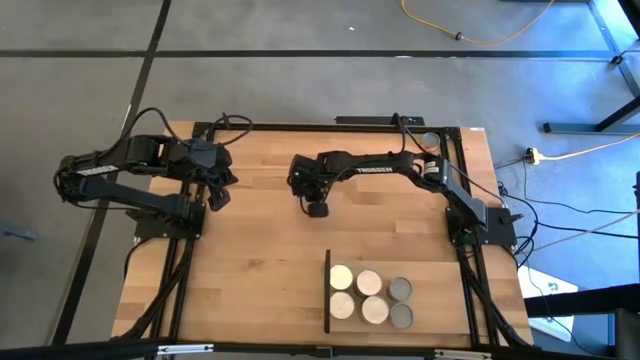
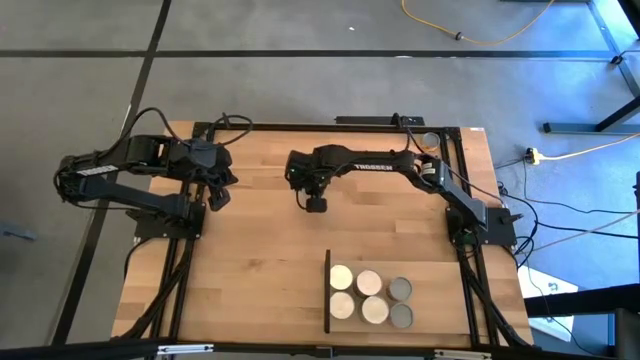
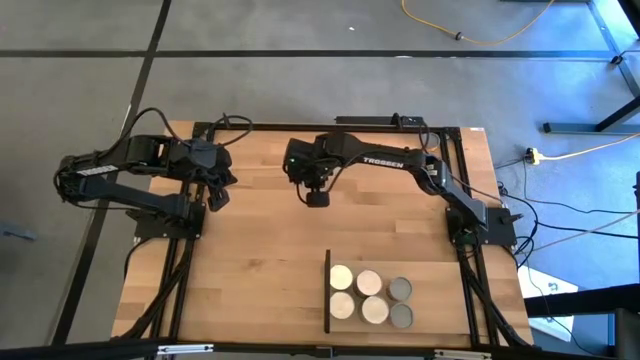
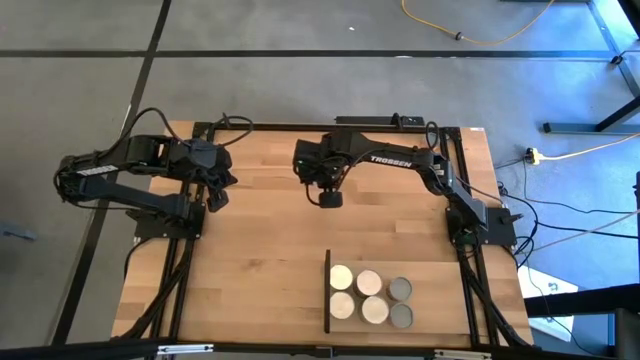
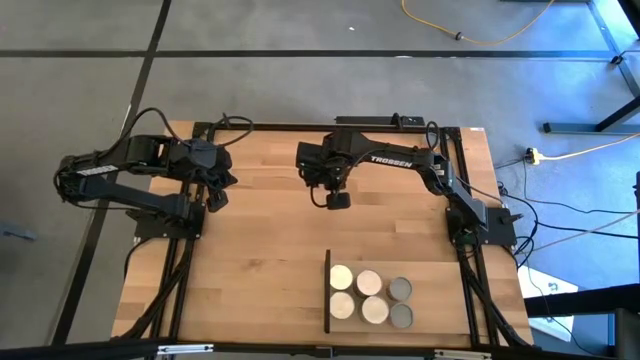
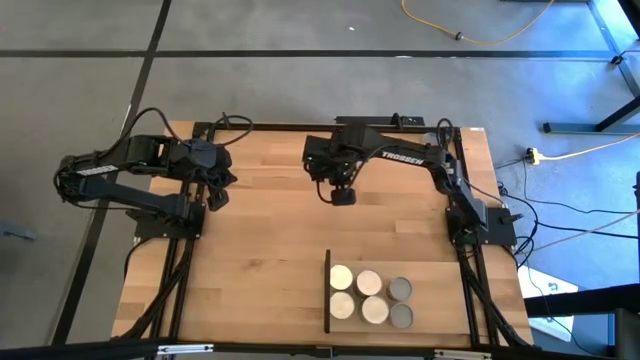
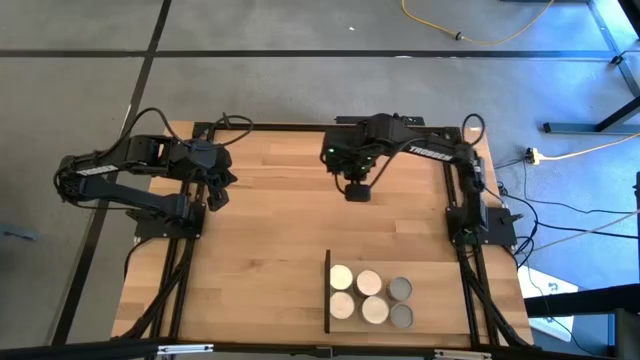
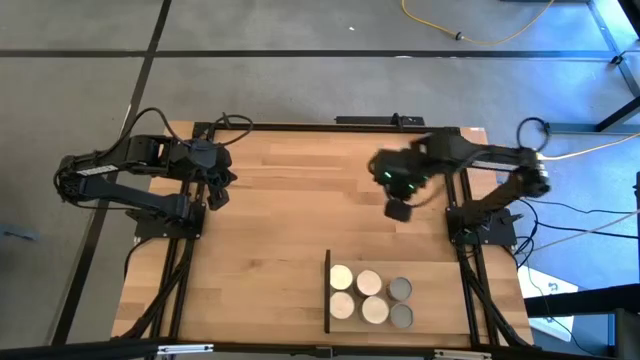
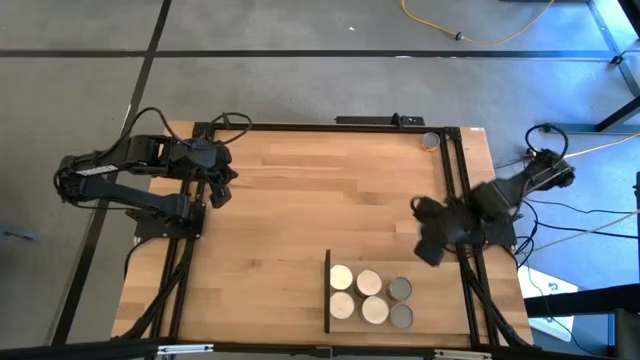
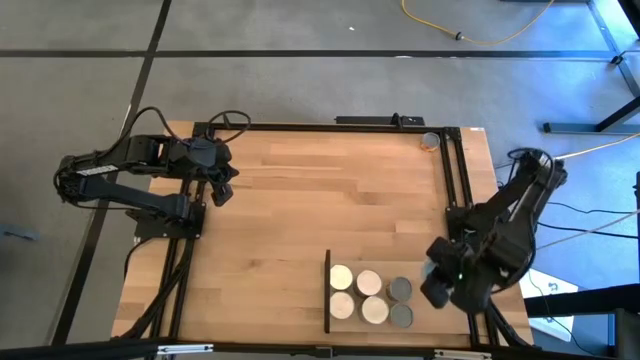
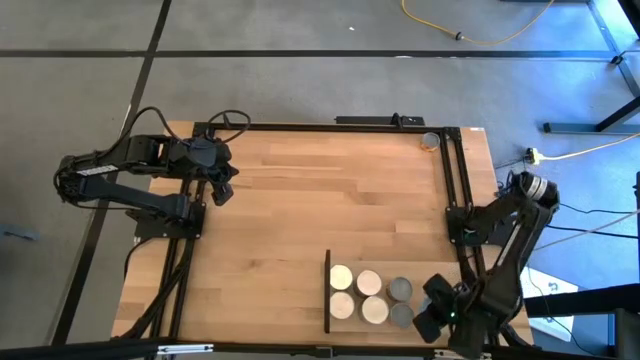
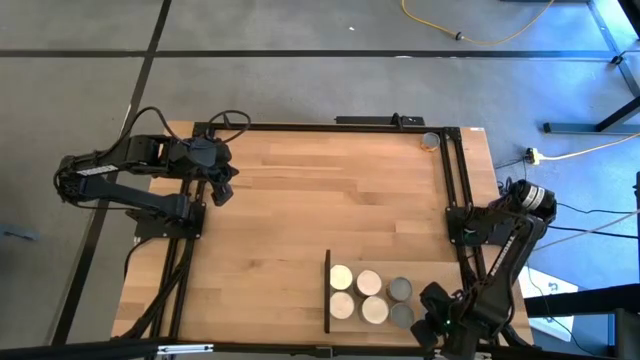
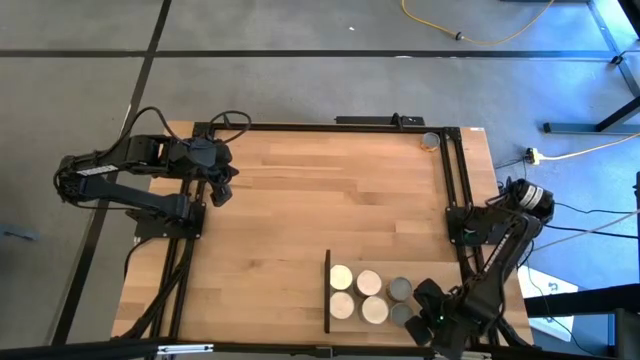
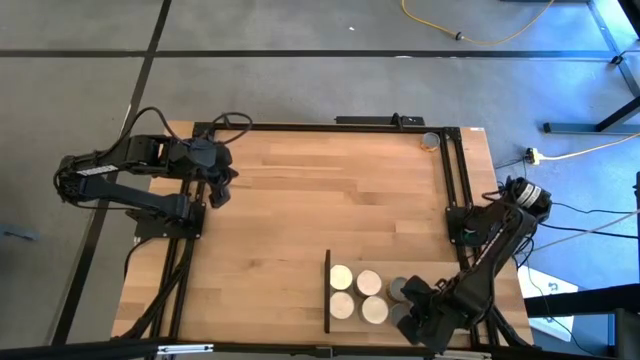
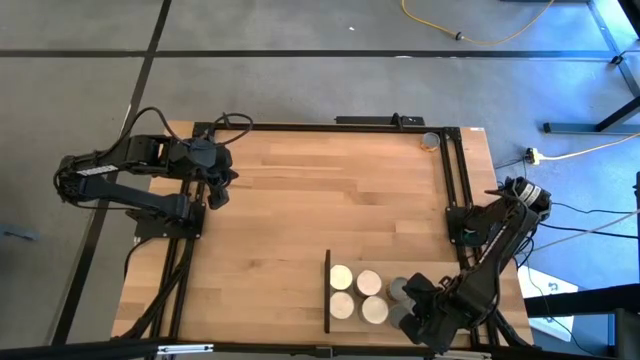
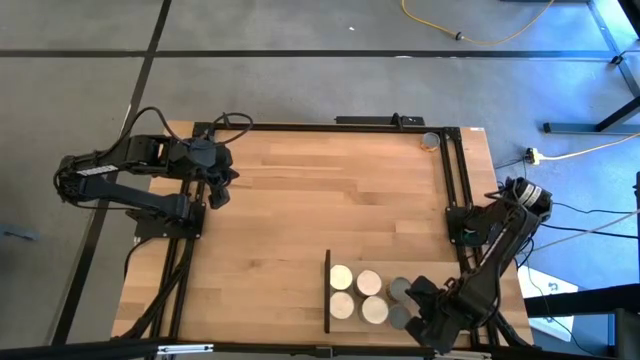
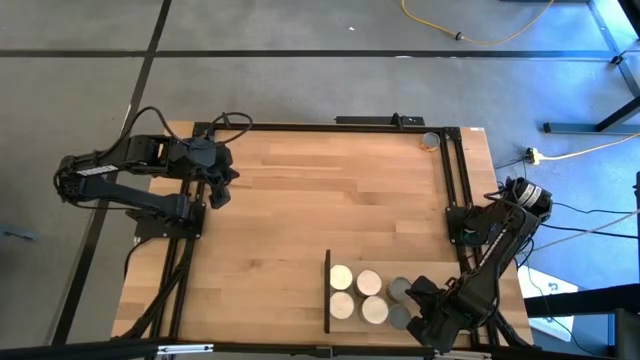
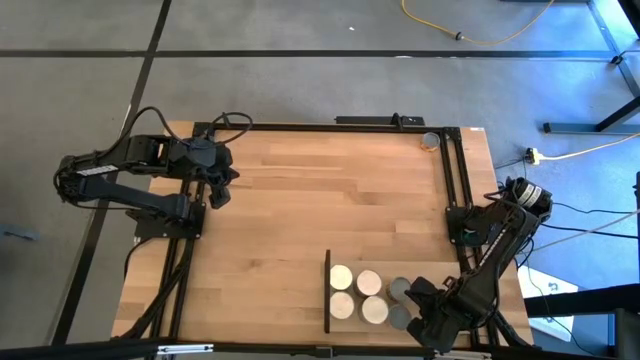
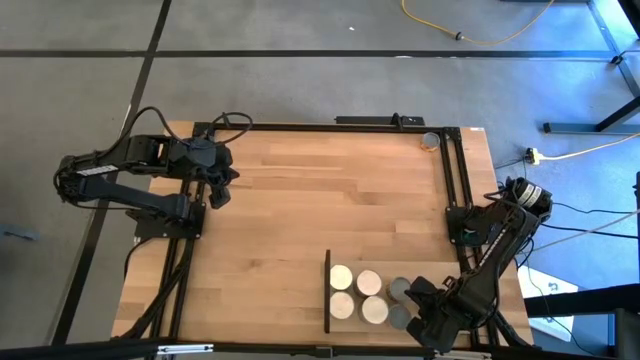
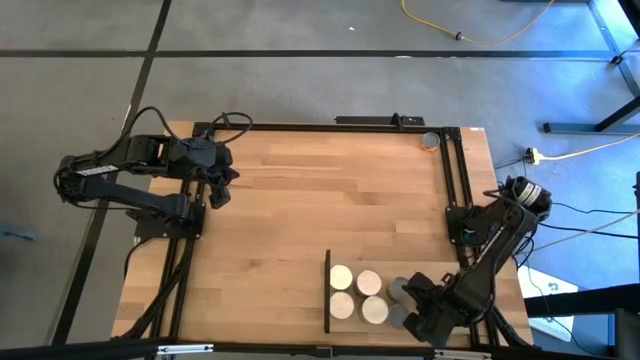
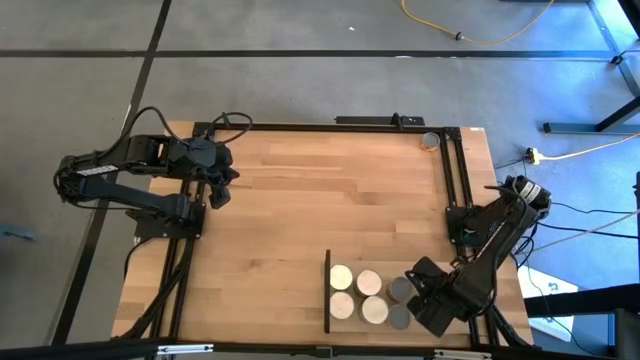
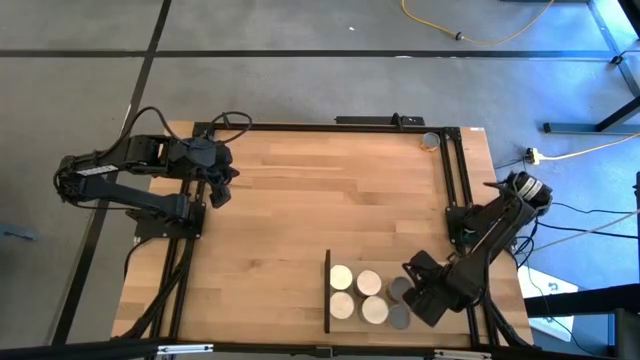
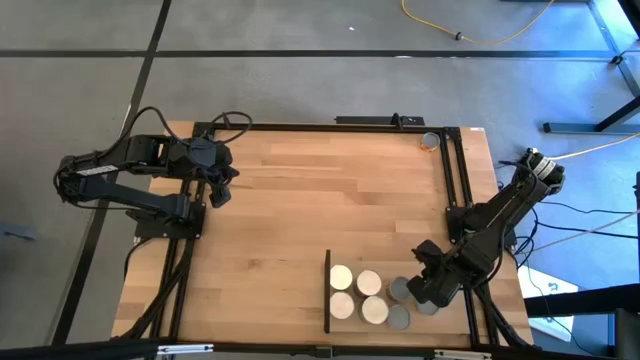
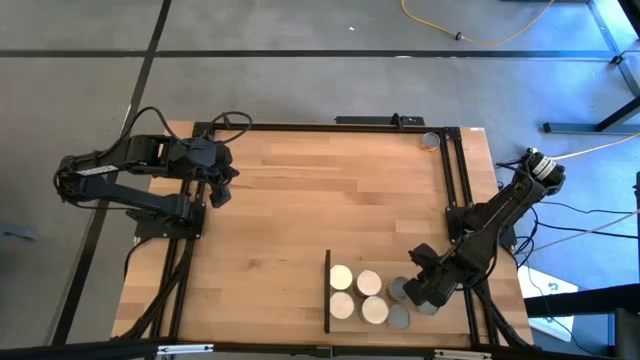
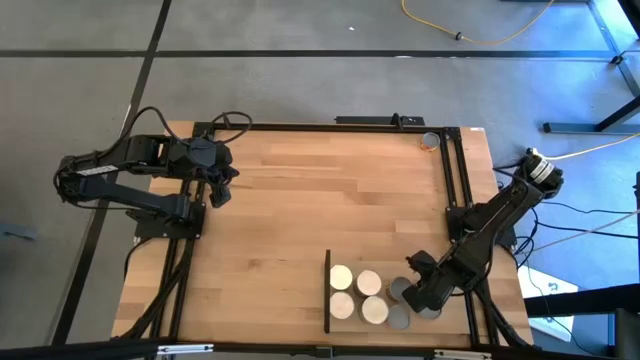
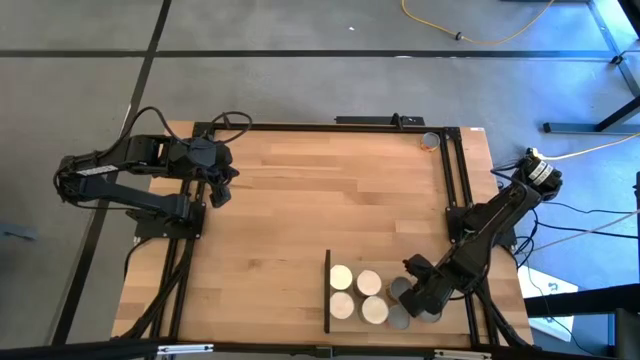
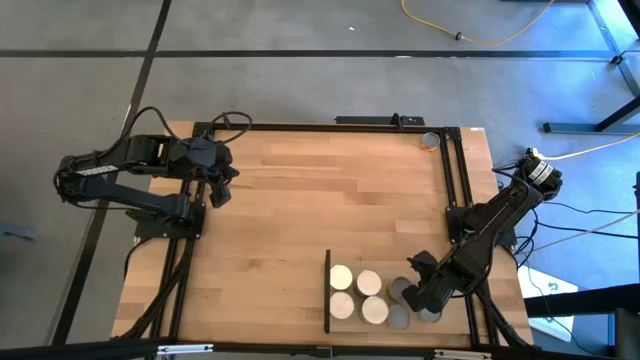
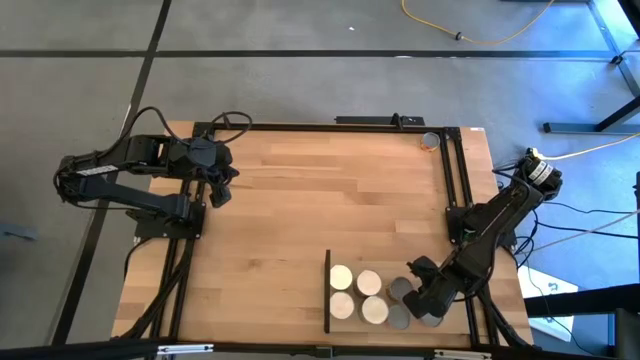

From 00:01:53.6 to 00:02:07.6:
Task: Pick and place cans onto a shelf
Put the blue tuna can on the shelf

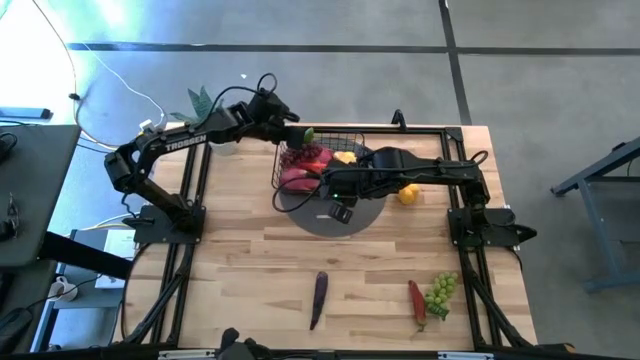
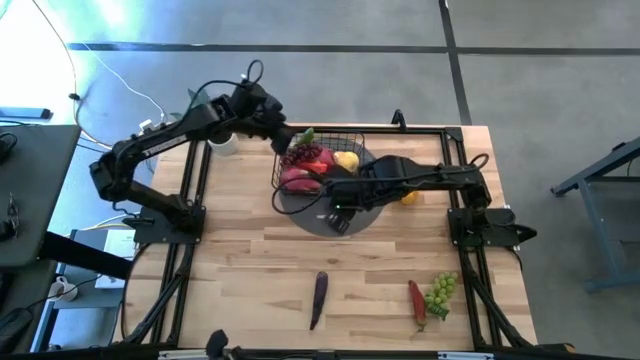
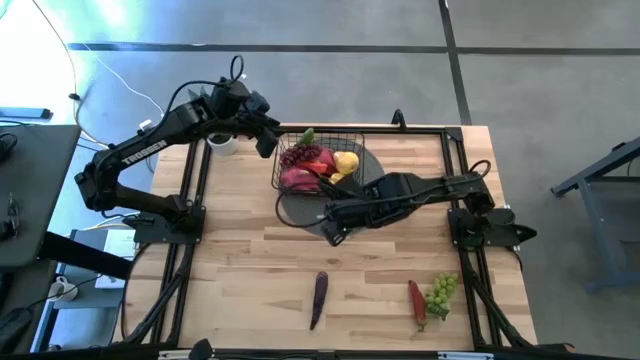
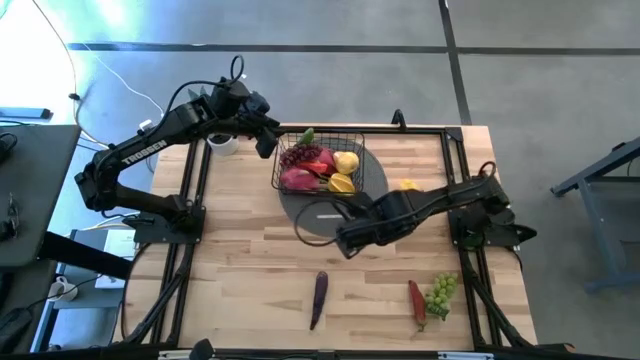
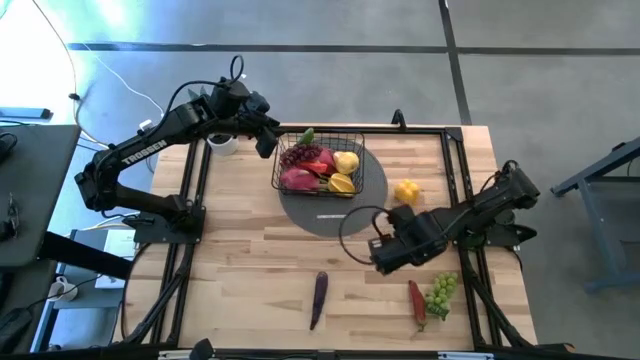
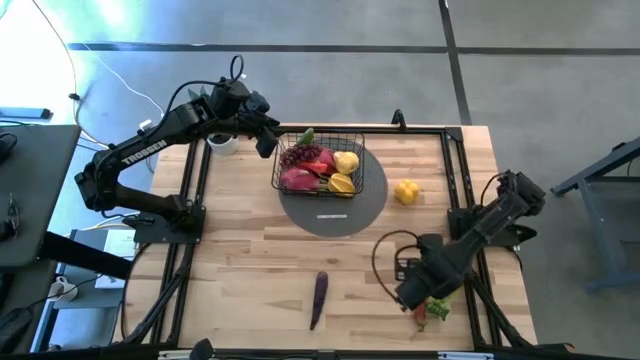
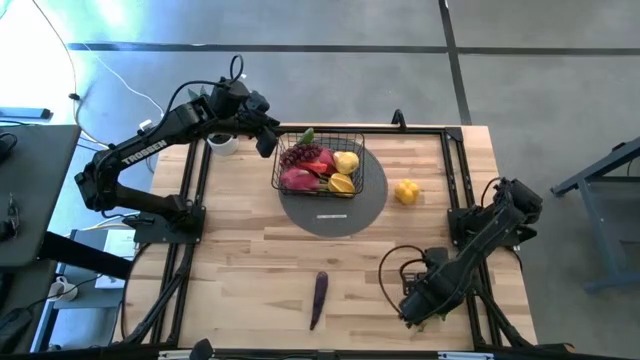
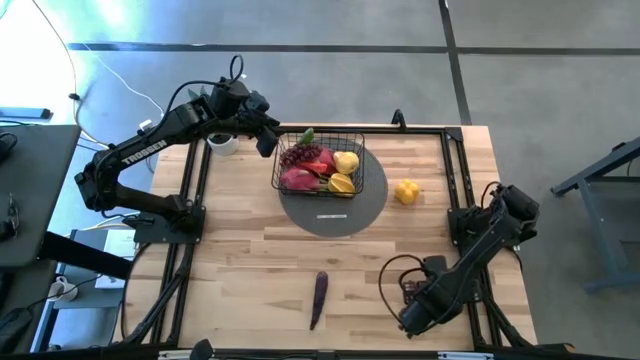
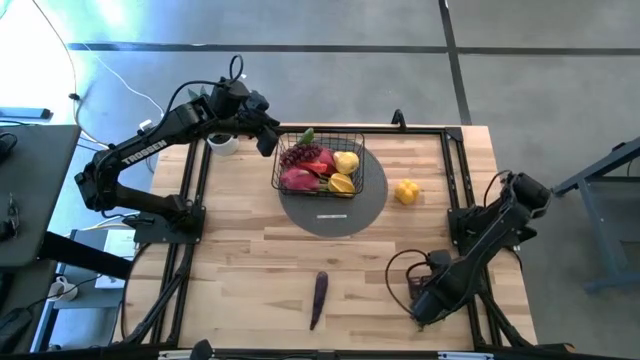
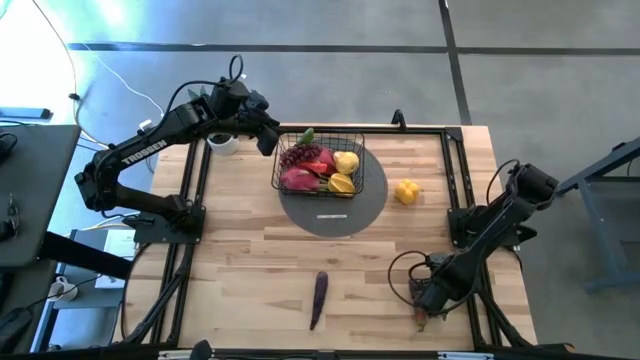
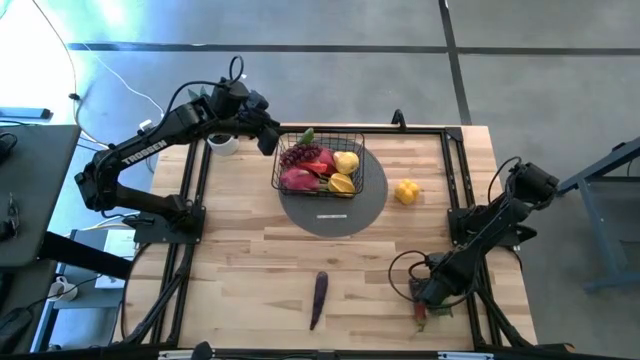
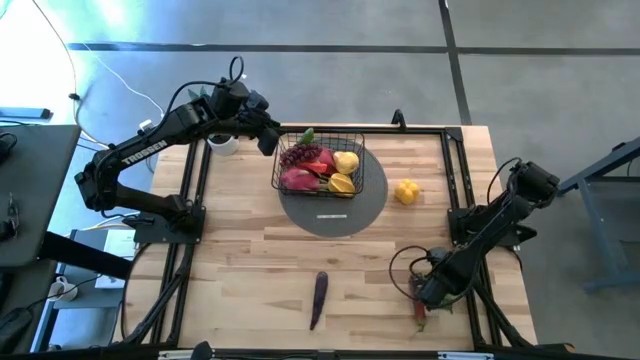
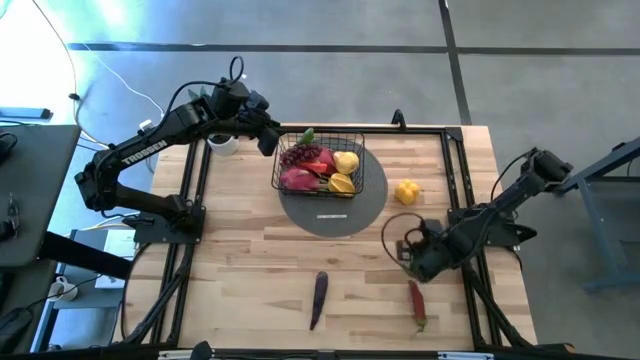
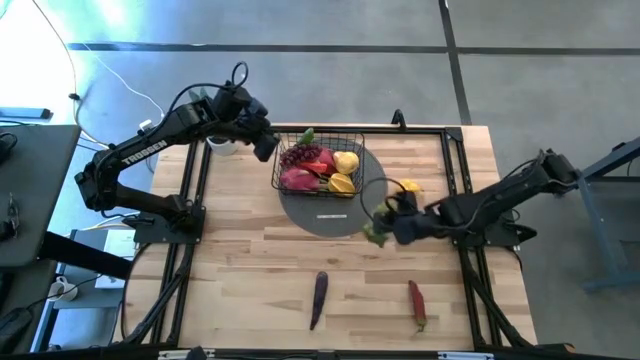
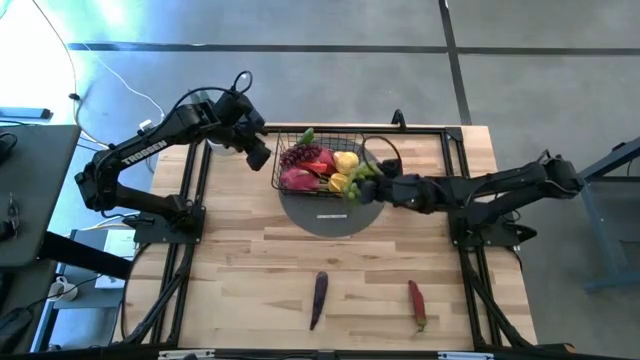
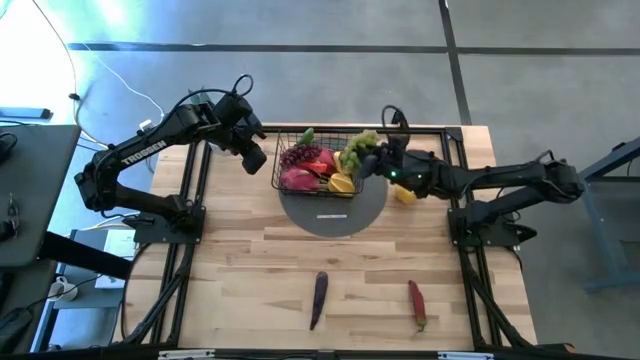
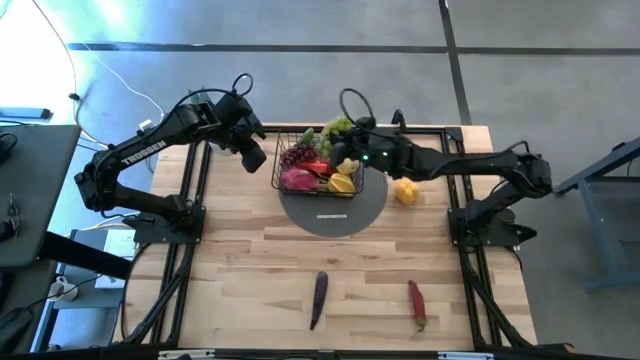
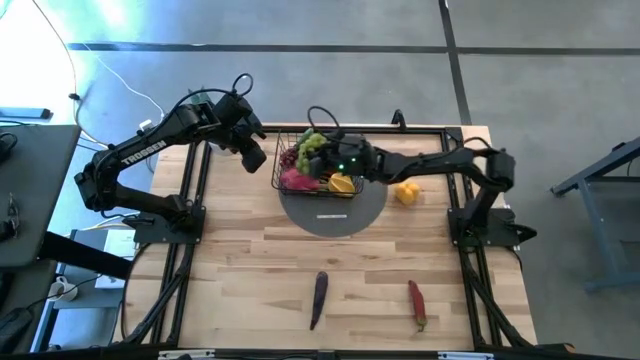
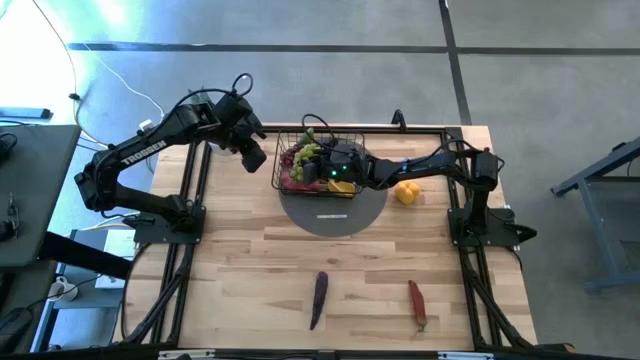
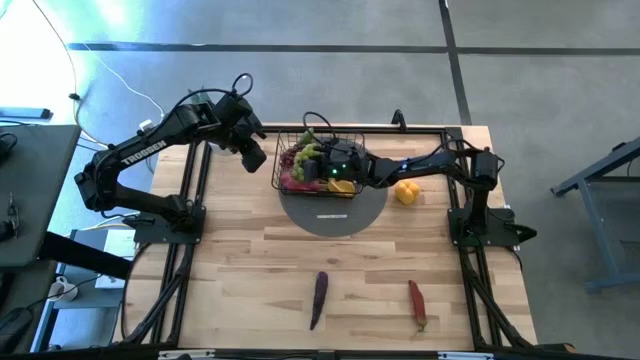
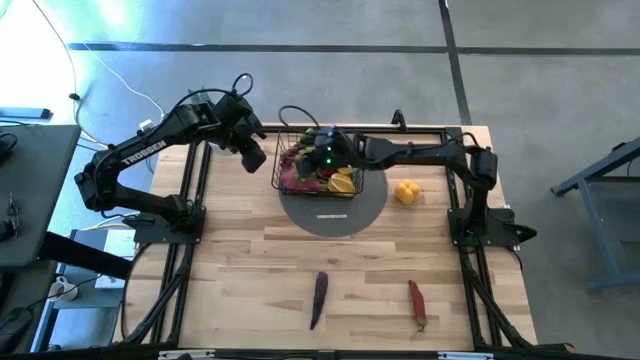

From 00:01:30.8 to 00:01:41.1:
Task: Build produce basket
Put the green grapes into the black wire basket
